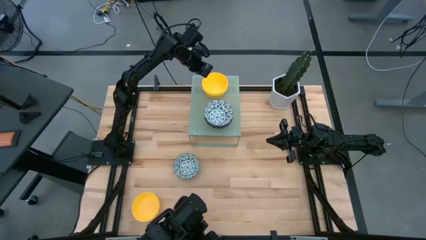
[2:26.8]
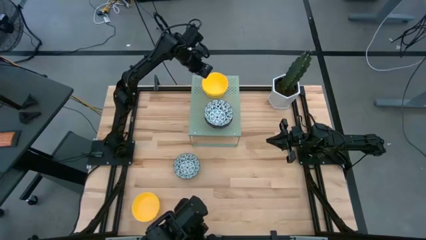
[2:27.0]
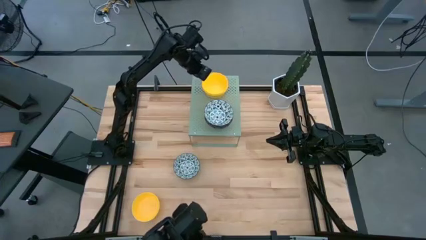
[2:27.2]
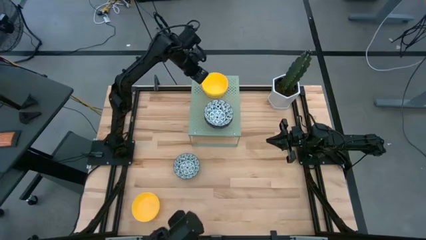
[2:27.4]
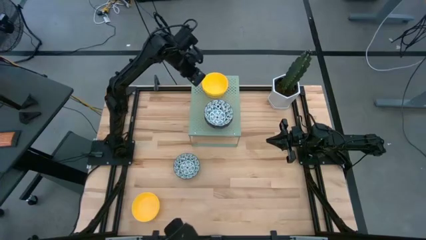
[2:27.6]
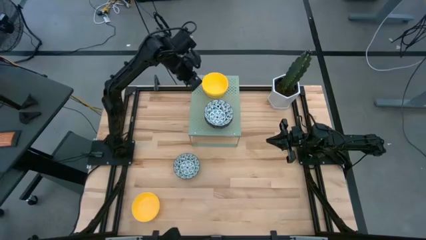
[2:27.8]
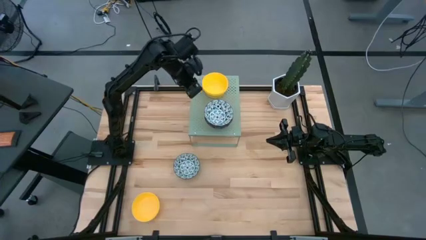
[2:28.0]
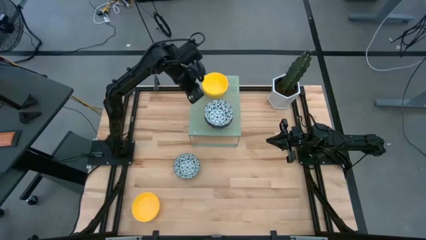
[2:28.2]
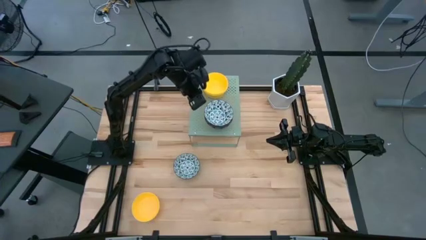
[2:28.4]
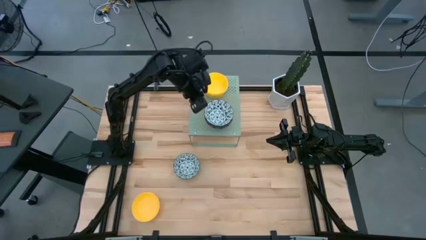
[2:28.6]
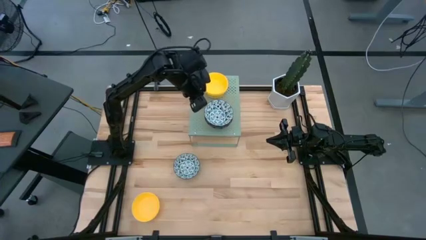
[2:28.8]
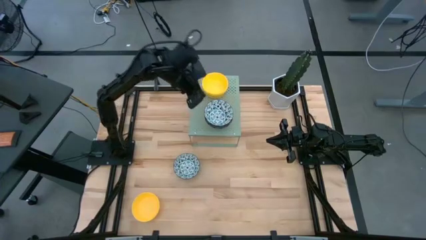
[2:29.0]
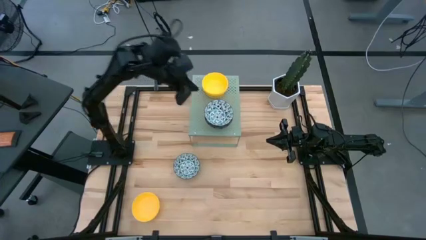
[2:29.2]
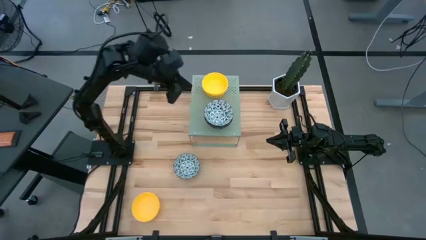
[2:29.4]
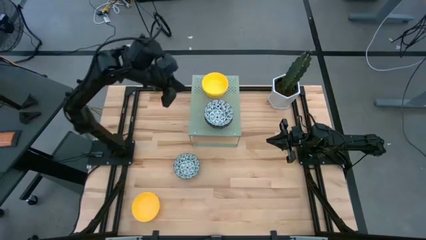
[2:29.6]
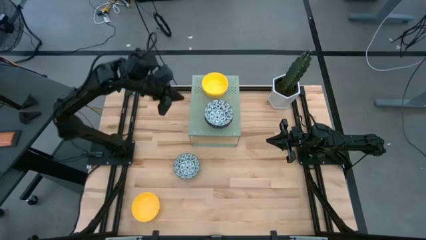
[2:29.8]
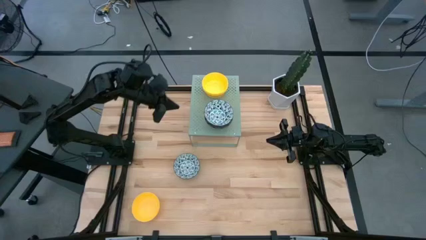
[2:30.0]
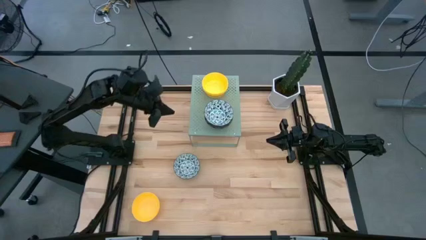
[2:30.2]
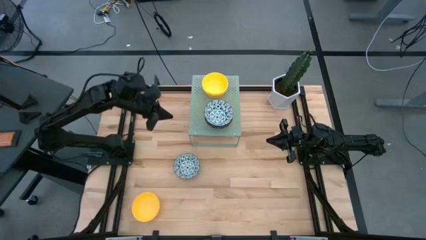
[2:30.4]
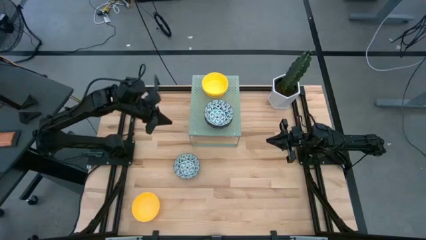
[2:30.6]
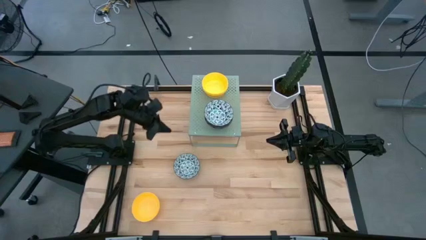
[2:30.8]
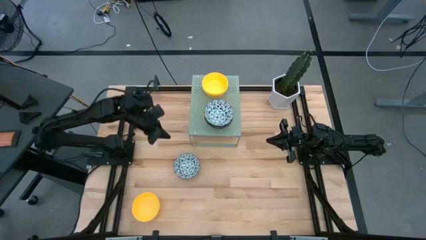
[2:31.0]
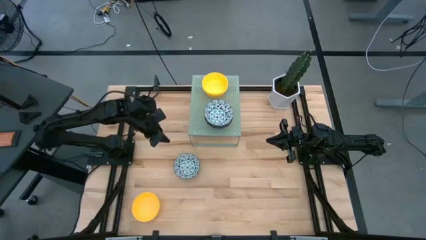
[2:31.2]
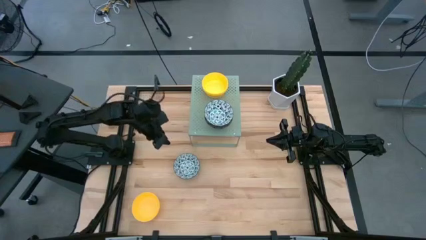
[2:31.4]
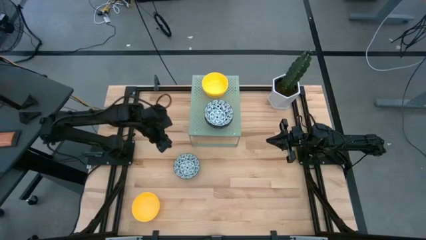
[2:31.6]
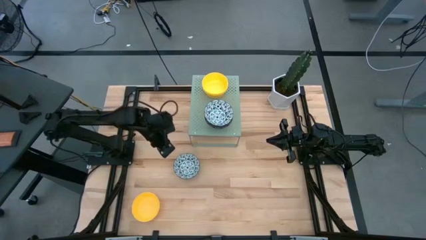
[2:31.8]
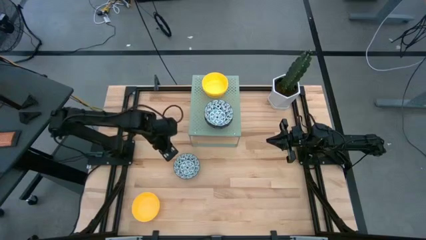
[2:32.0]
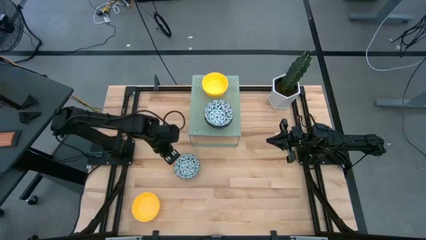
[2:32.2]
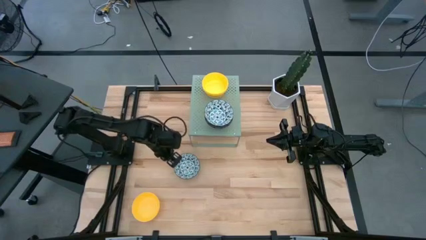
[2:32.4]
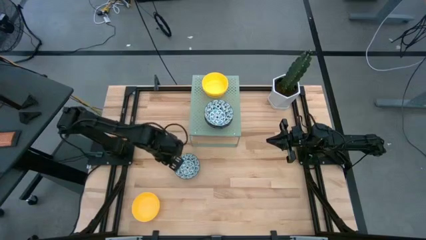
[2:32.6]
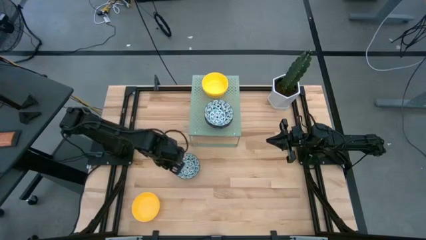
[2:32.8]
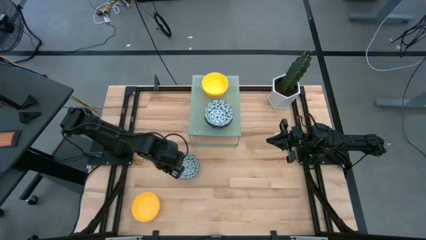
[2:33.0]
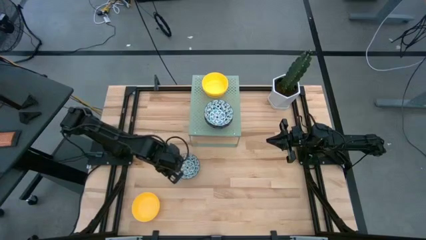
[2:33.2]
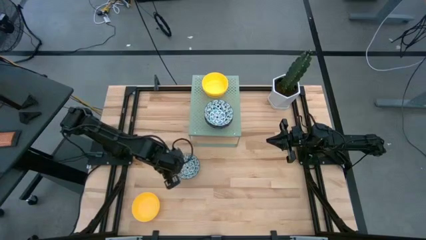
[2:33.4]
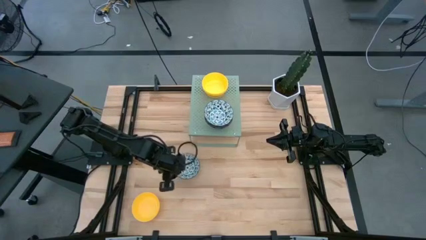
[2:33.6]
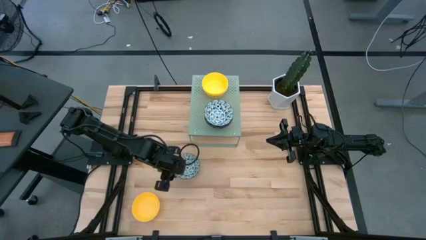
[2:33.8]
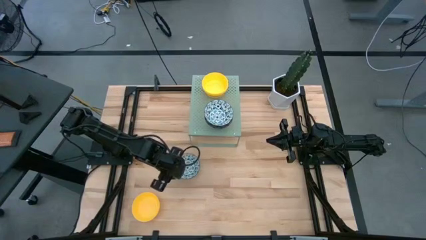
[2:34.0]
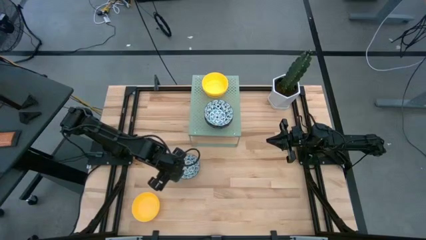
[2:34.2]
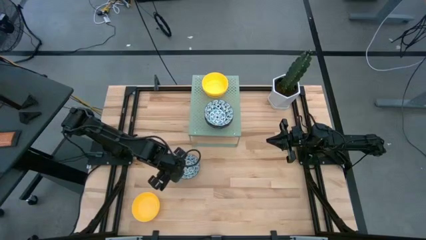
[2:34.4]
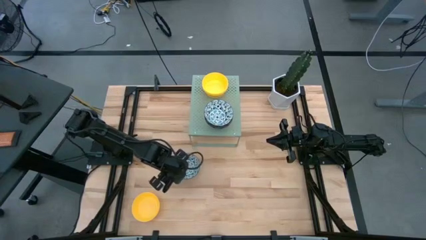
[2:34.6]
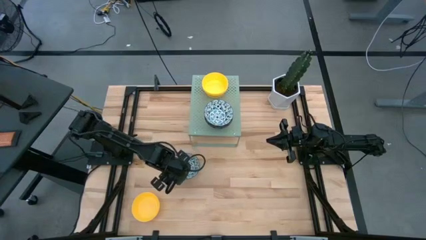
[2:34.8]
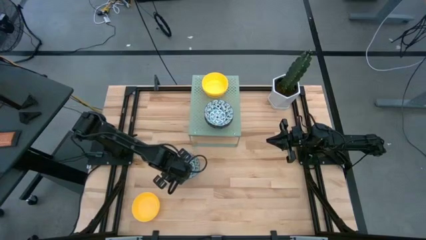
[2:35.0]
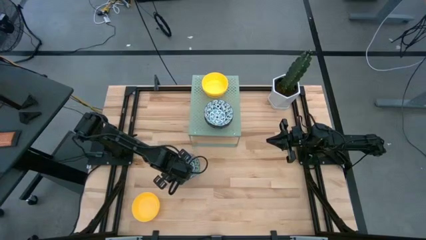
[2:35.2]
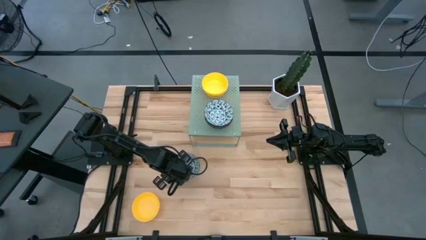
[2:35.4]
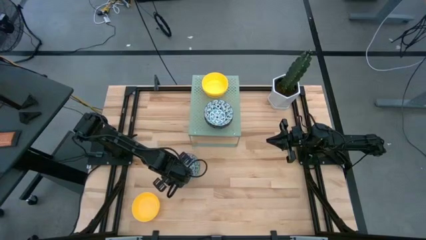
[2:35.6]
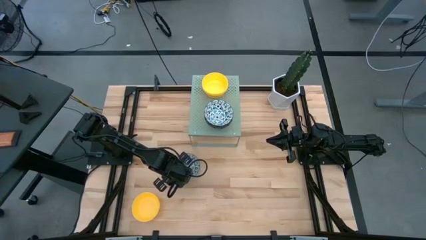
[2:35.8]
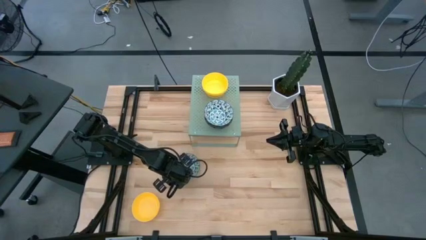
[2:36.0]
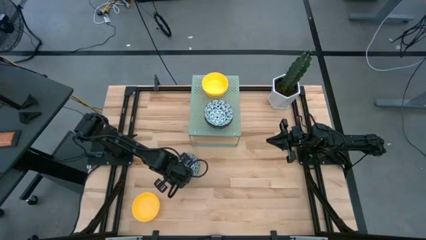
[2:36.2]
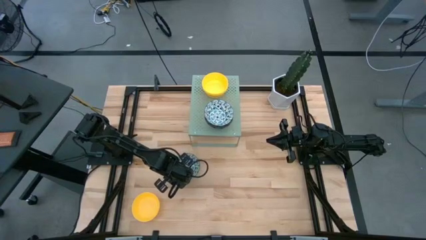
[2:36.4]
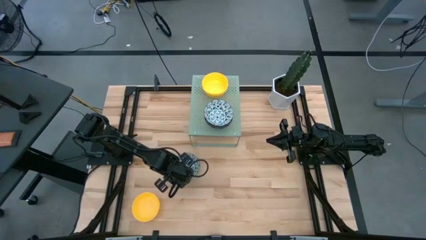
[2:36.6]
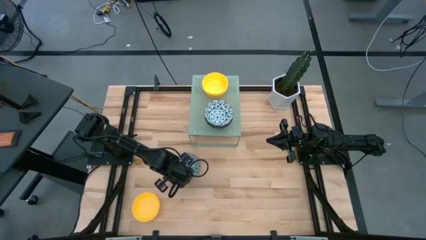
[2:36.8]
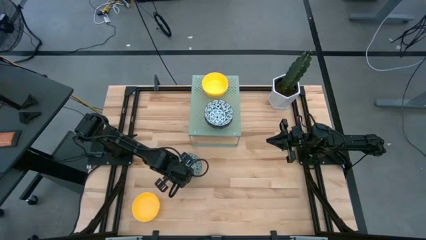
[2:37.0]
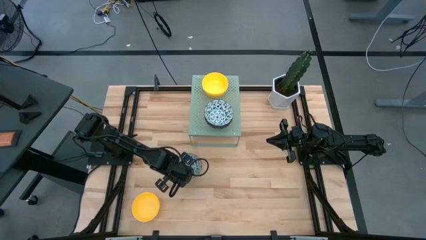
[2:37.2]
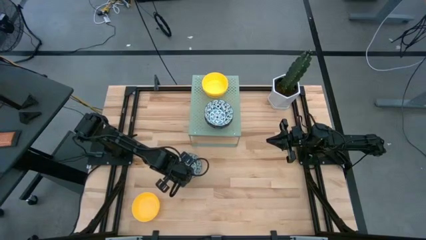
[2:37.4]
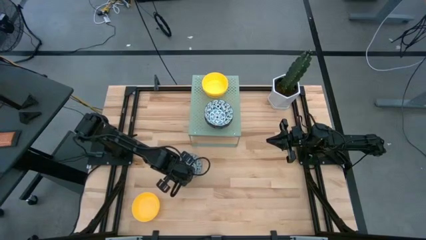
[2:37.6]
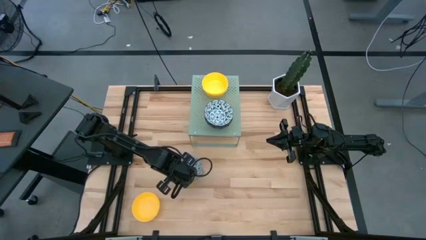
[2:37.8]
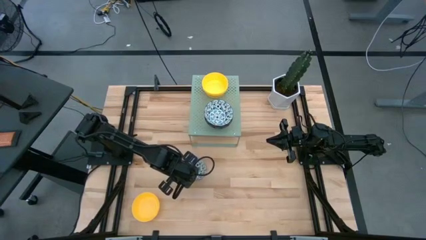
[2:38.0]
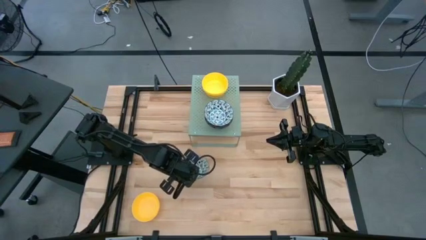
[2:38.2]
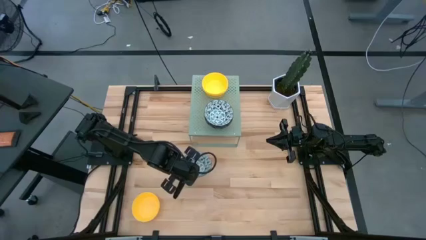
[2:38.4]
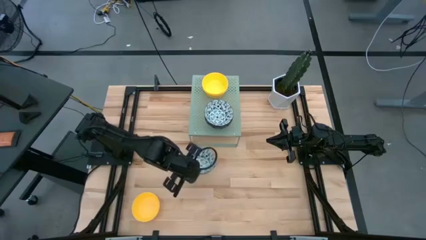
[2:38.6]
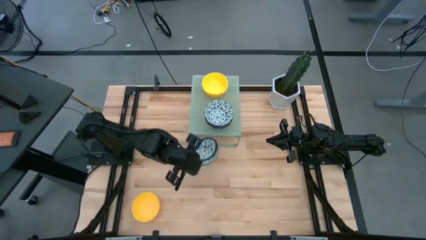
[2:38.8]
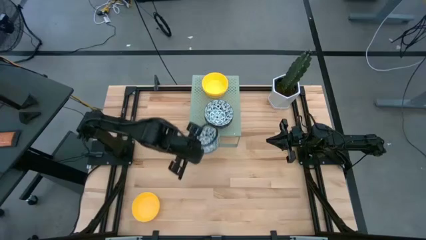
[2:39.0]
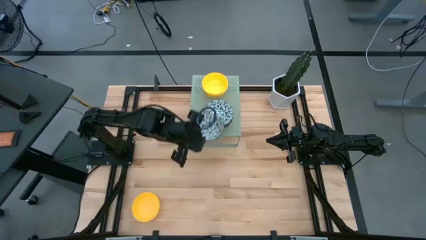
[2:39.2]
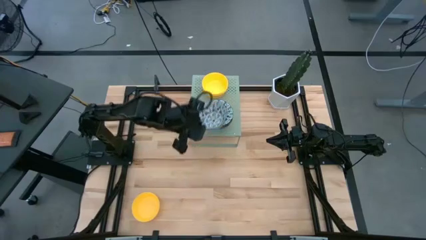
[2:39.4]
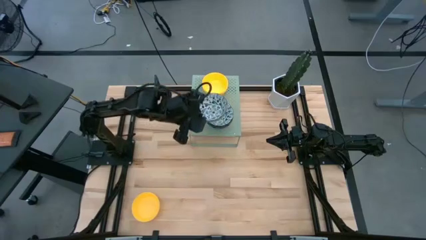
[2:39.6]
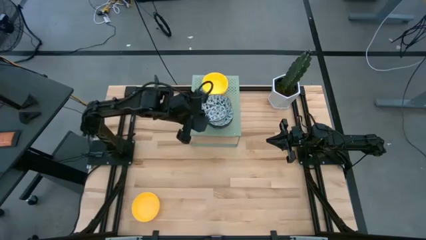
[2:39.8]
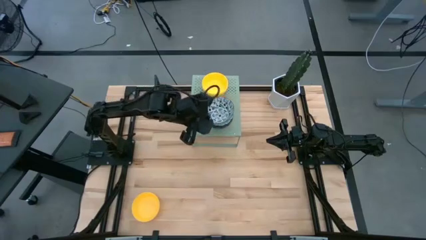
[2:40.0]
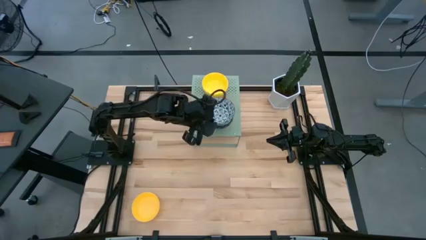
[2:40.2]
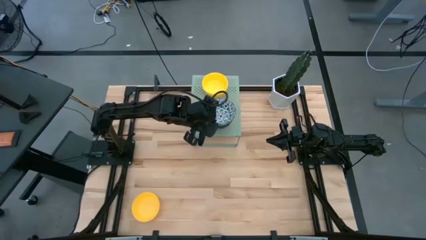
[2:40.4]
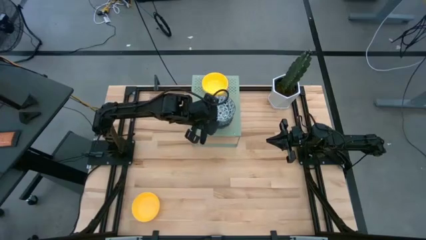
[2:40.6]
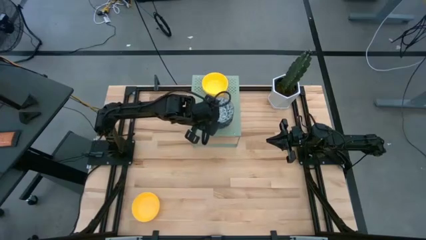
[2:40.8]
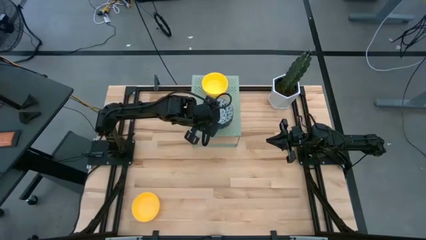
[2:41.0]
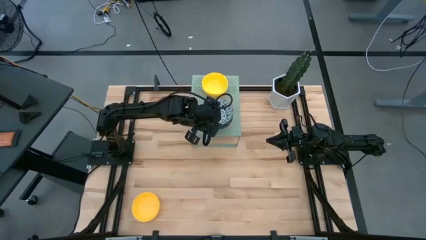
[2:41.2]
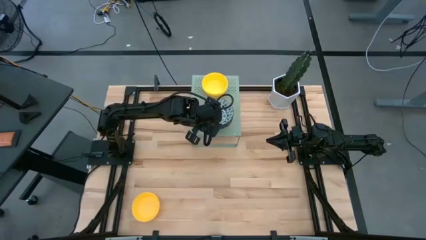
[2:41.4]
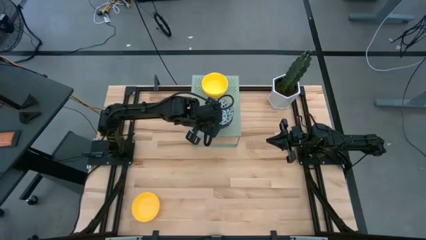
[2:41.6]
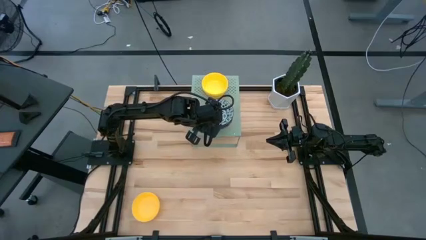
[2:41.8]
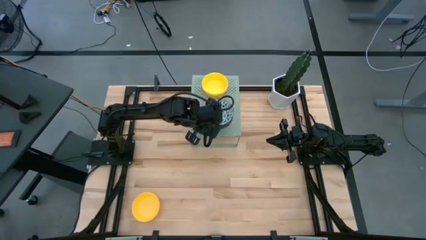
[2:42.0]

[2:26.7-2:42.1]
Task: Pick & Place Mini bowls
Stack the blue and white bowl on top of the other blue and white bowls on the shelf
